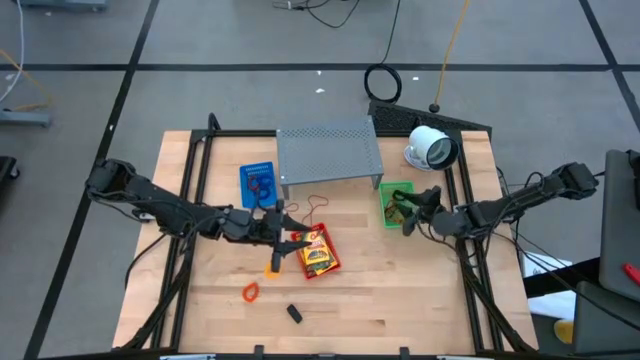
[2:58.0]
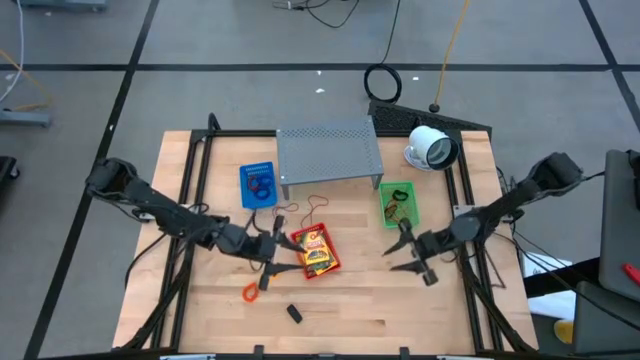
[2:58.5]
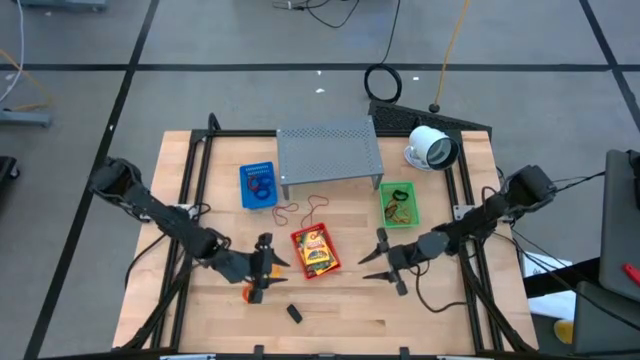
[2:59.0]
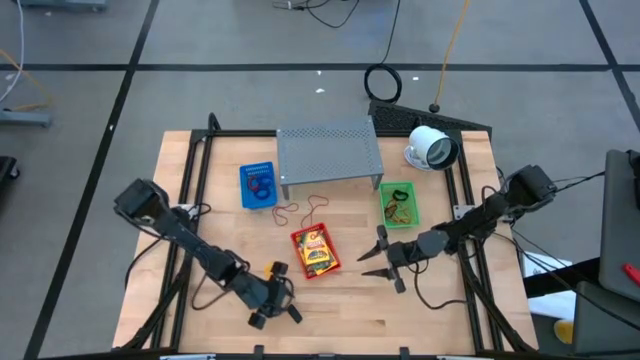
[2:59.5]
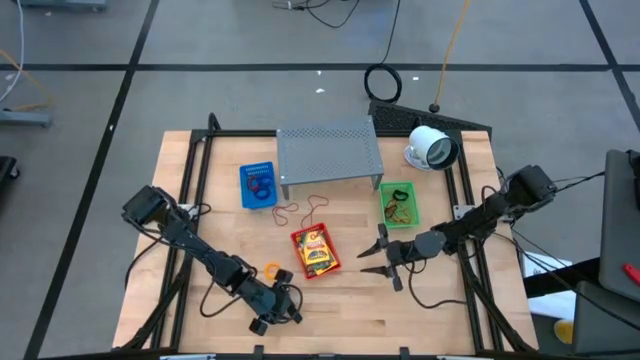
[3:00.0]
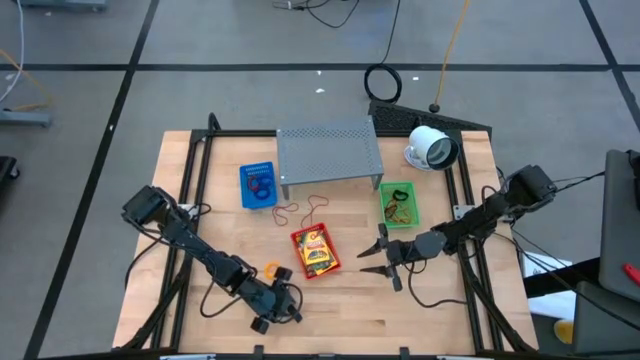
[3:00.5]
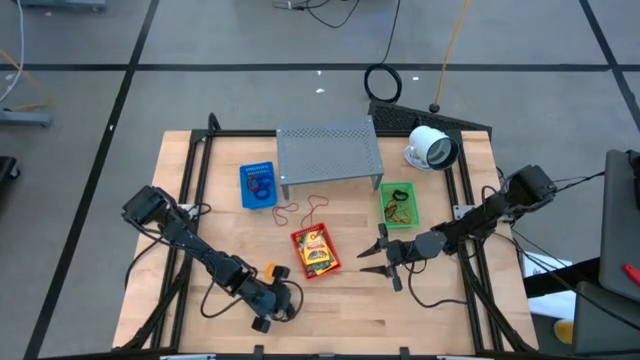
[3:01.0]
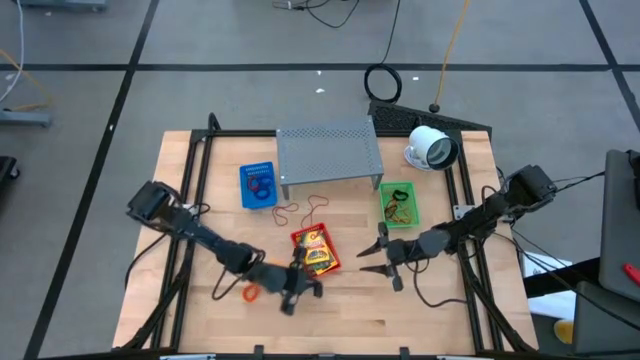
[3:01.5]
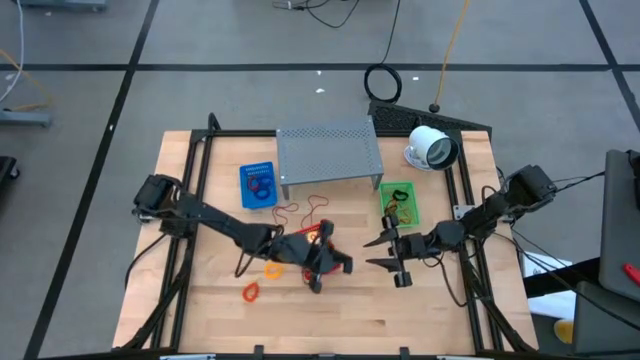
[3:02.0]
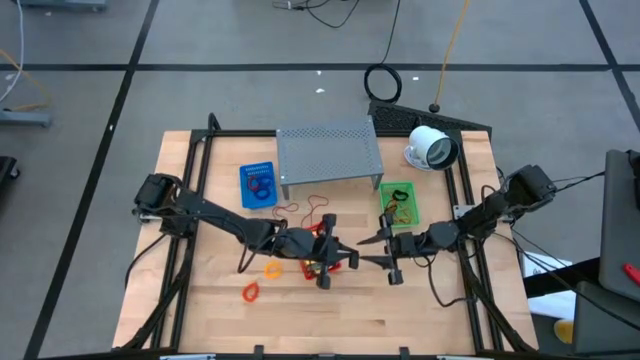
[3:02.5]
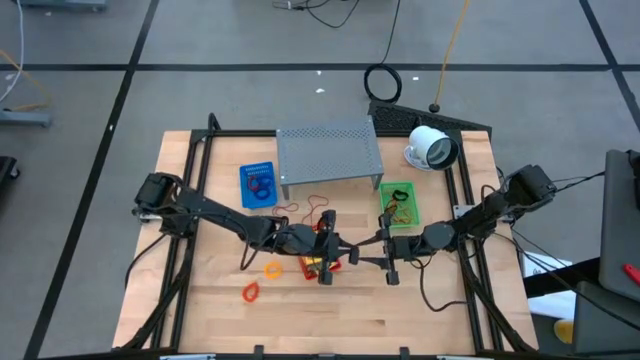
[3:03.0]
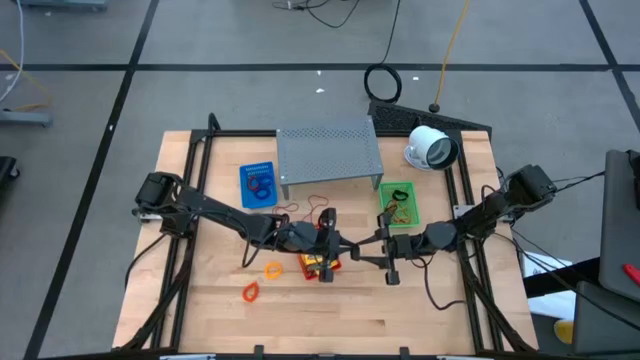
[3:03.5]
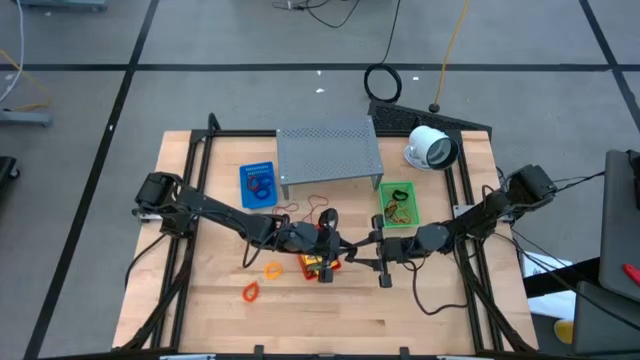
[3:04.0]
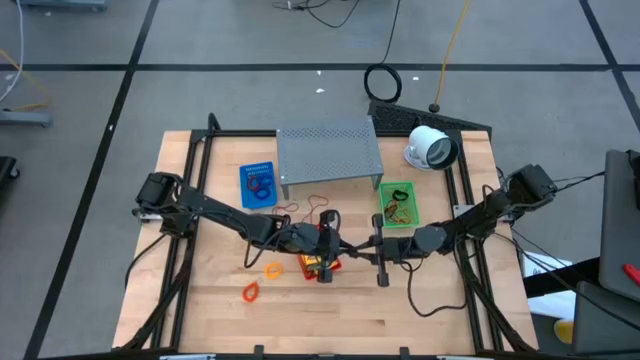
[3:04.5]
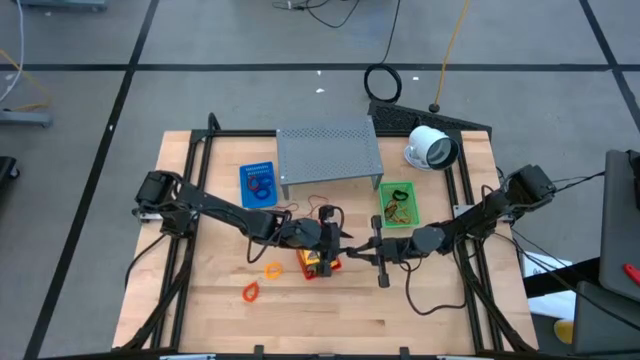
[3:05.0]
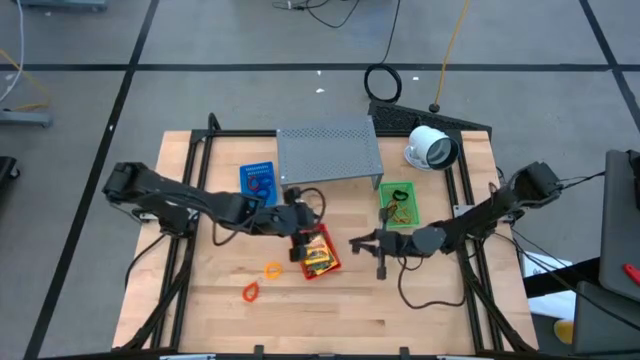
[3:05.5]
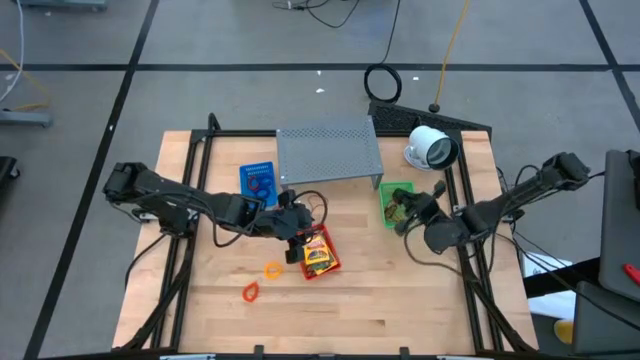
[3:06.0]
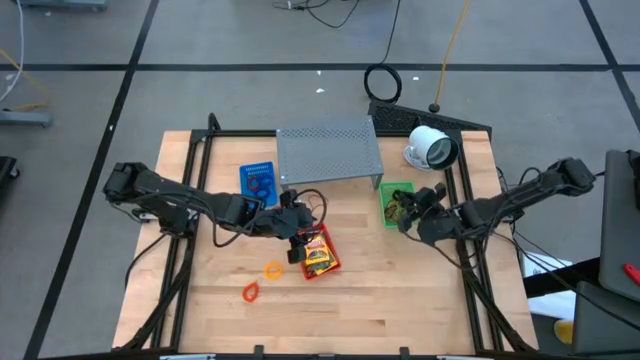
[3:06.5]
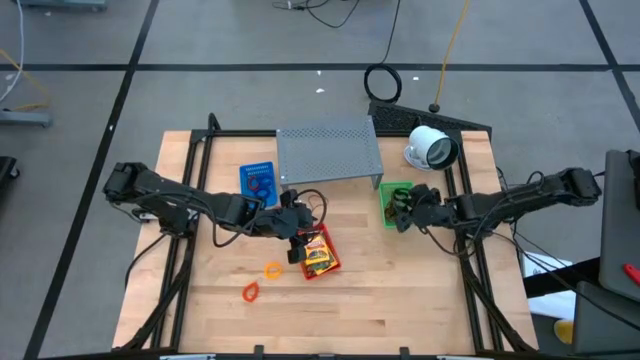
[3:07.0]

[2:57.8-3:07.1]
Task: Pick & Place Office Desk Supplies
Put the black rubber band into the green bin

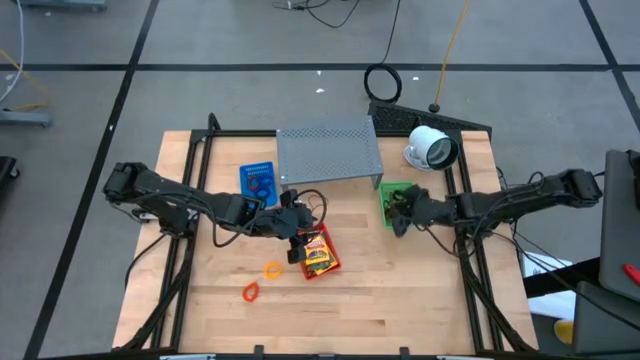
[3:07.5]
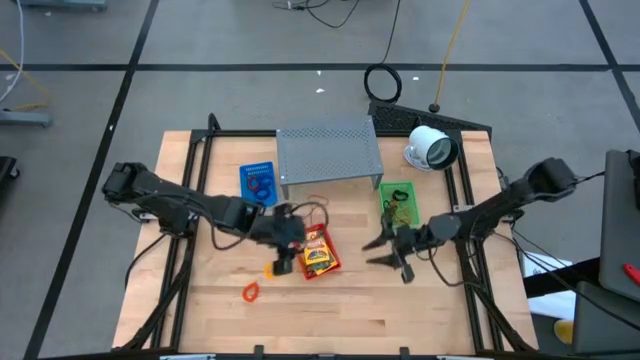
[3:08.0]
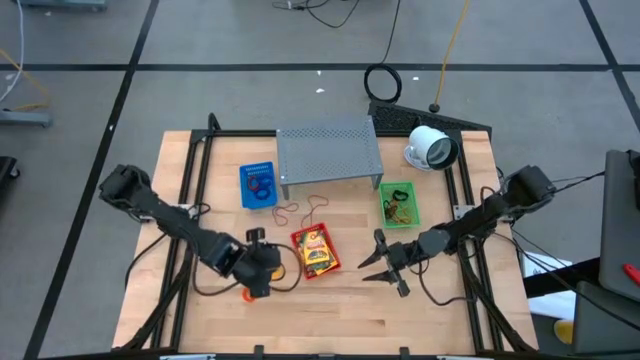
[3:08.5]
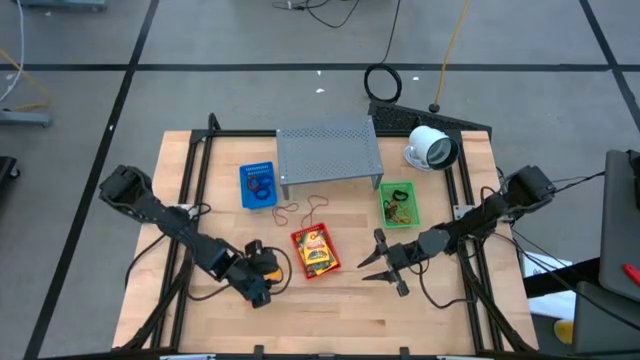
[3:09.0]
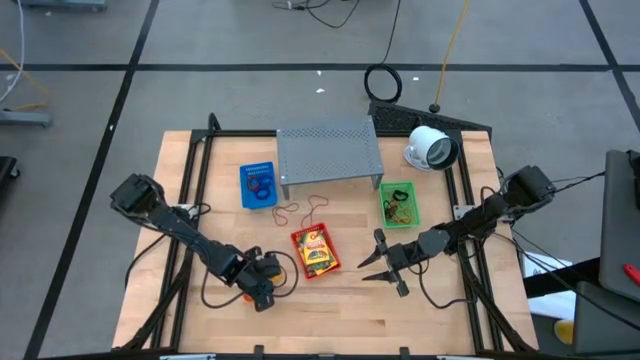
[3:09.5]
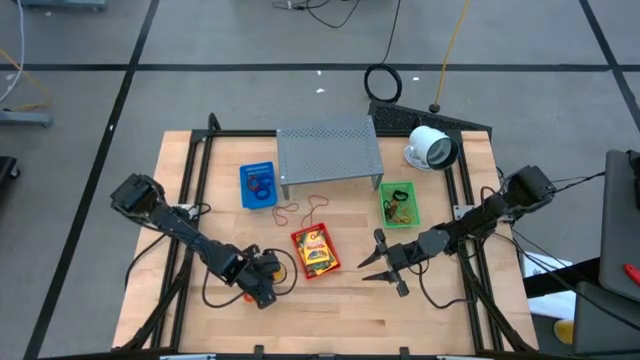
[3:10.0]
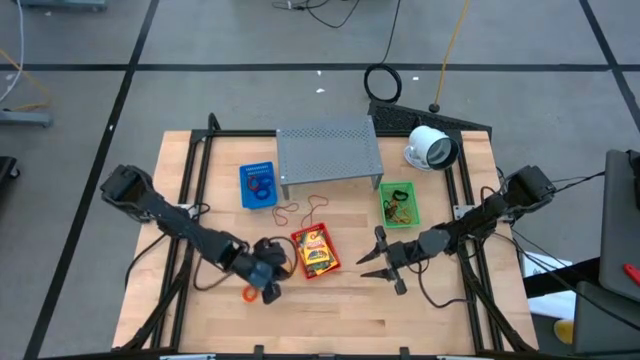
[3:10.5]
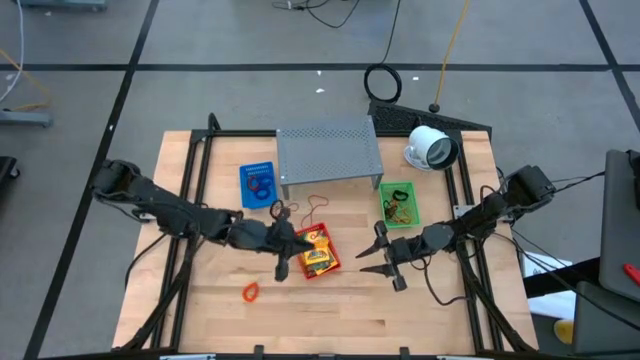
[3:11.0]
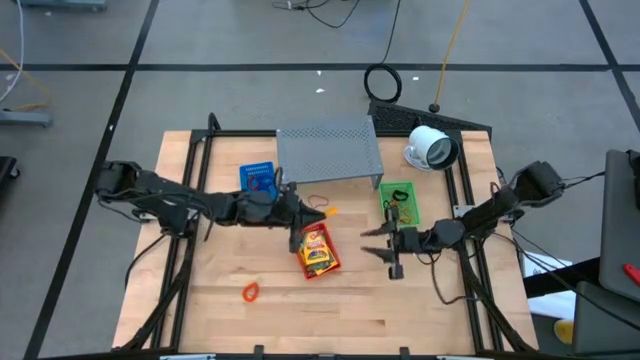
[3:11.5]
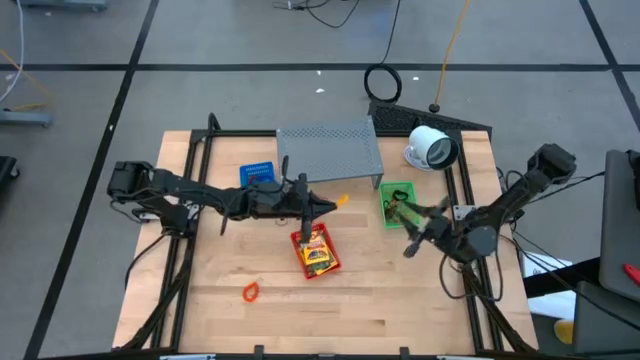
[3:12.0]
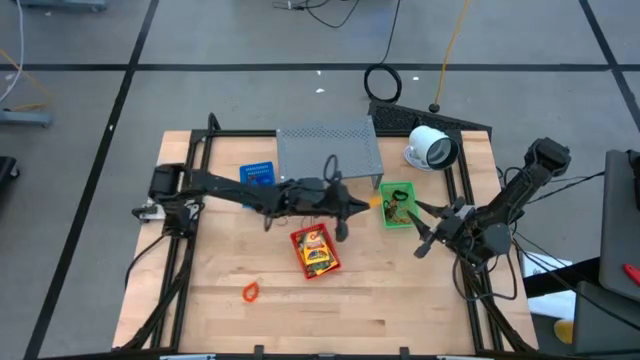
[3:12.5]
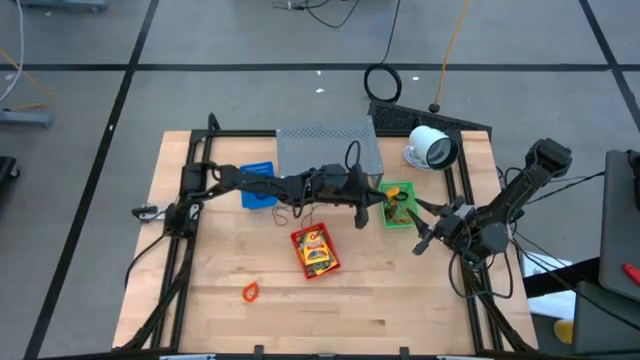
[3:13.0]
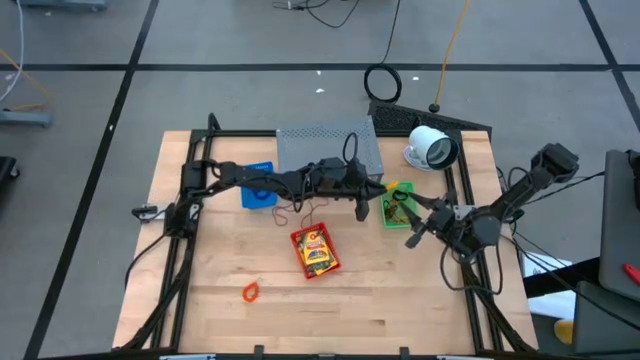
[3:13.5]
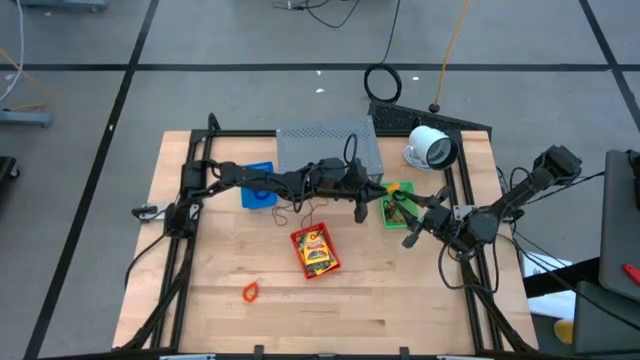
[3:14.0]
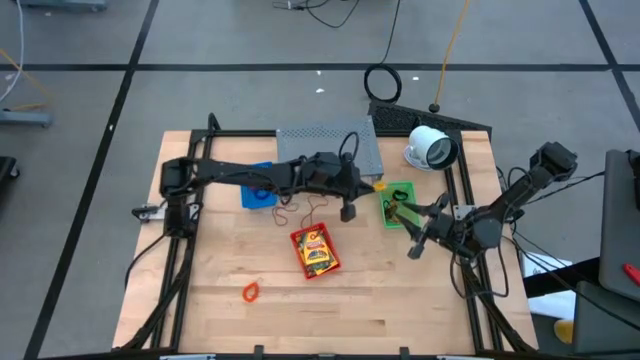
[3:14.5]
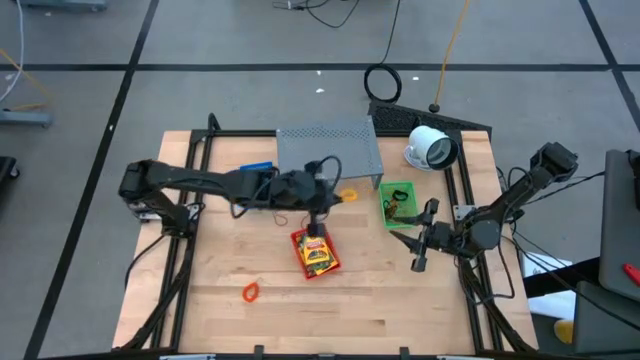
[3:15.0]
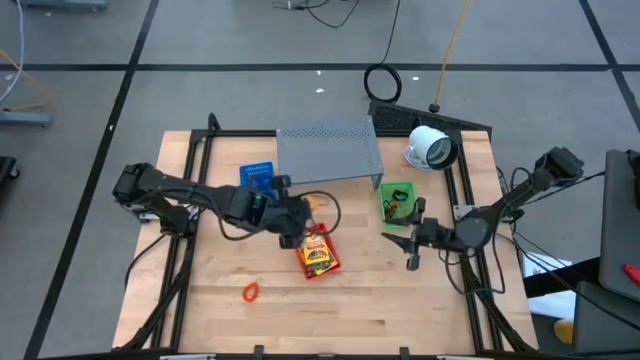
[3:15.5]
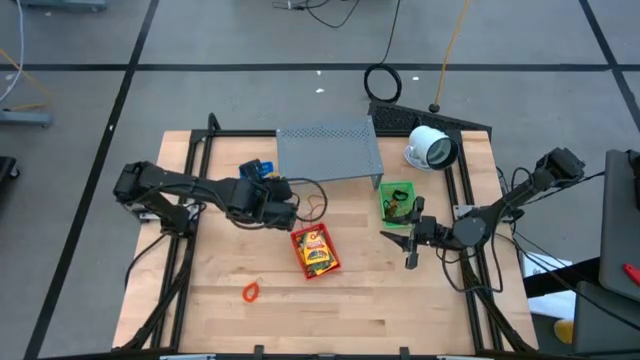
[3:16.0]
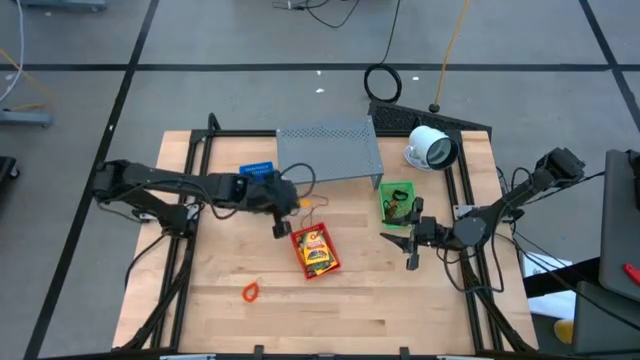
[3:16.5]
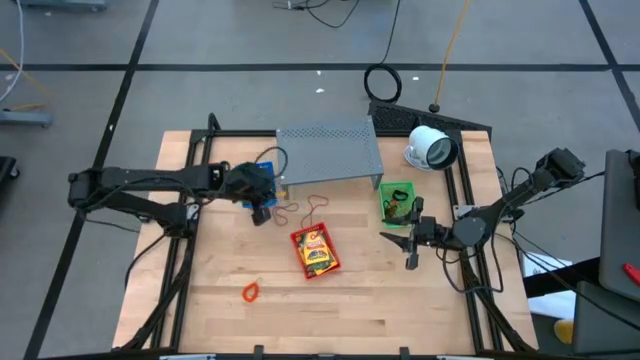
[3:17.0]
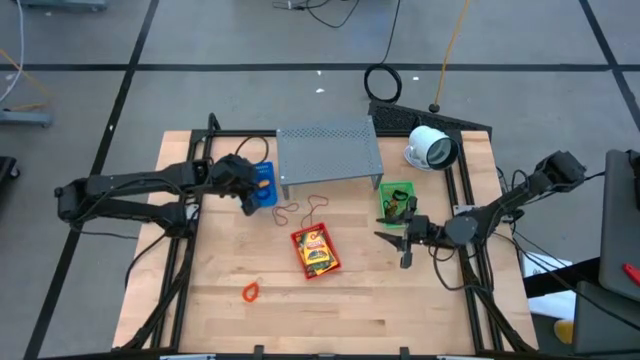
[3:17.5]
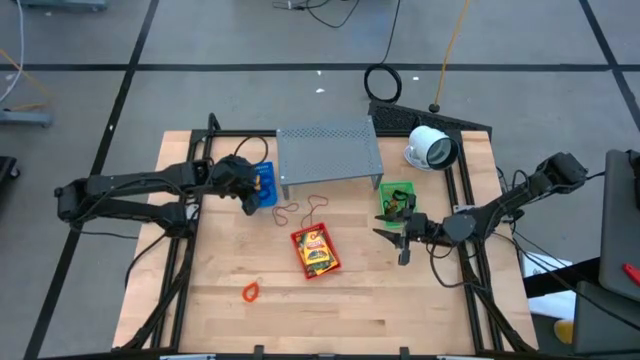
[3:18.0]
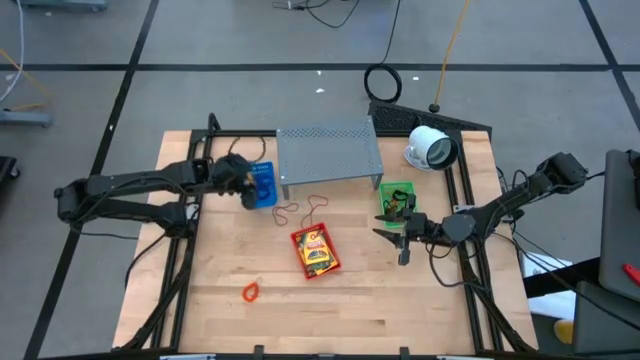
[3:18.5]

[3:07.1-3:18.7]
Put the yellow spring keychain into the blue bin

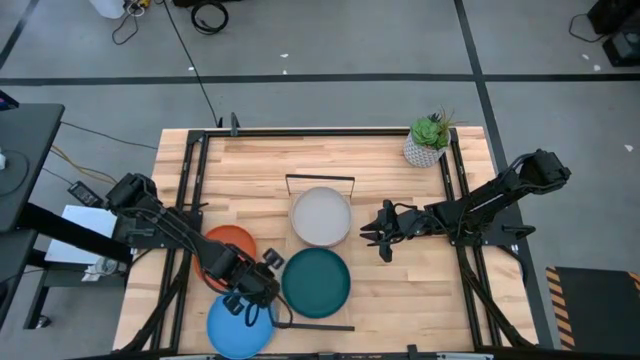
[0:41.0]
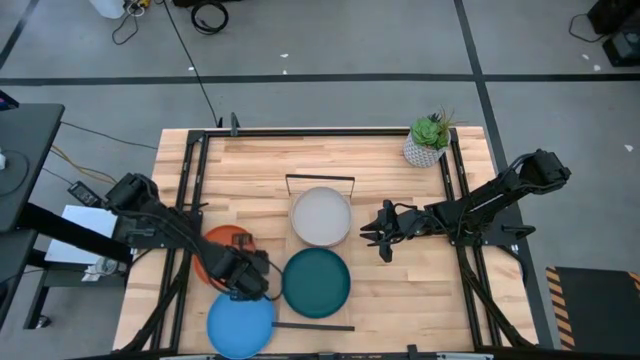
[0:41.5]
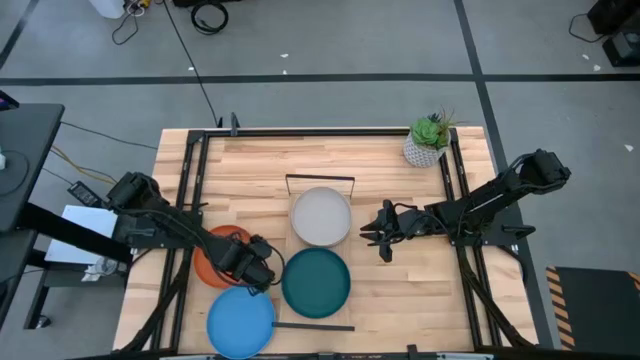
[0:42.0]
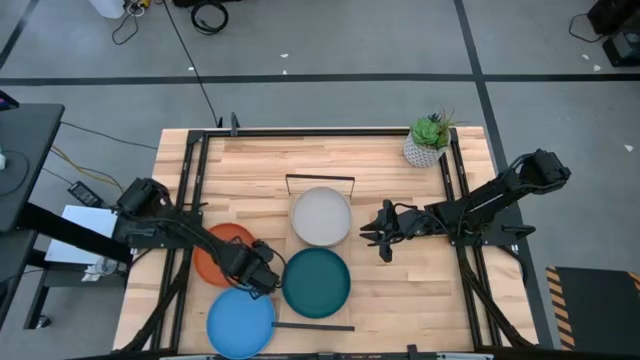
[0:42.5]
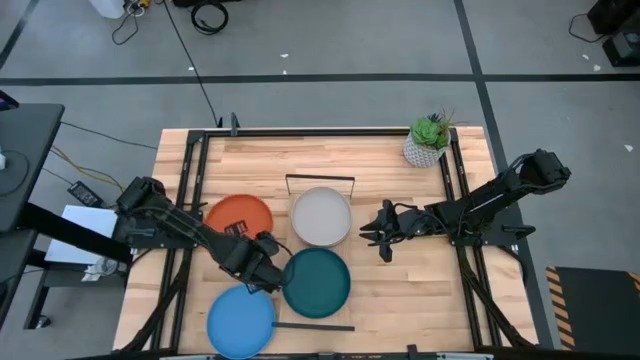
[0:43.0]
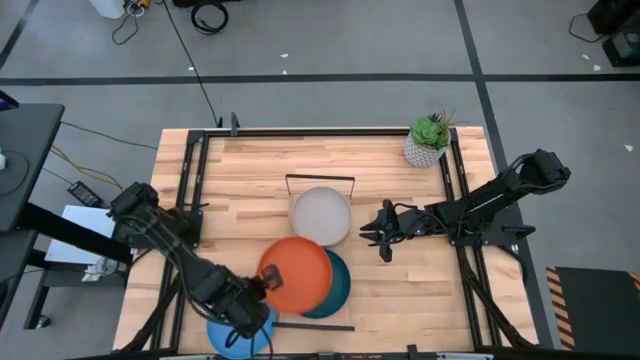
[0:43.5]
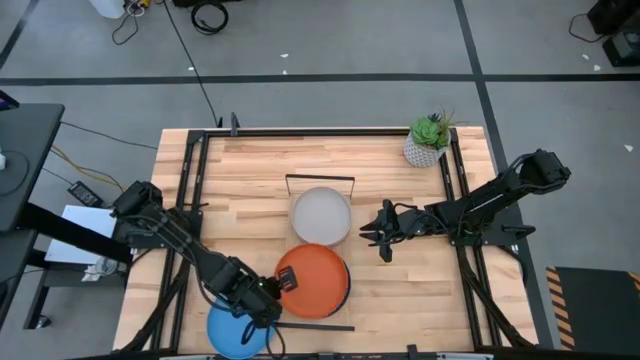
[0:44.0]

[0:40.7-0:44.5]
Task: Place and stack plates onto a shelf
Stack the orange plate on top of the dark blue plate on the shelf
